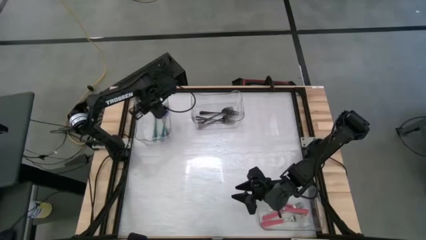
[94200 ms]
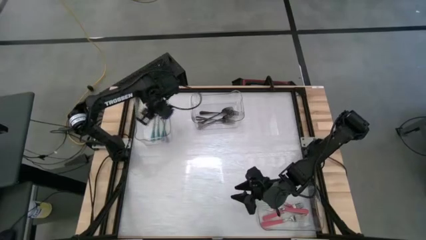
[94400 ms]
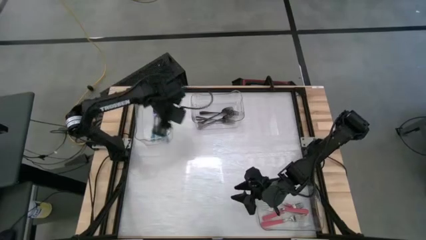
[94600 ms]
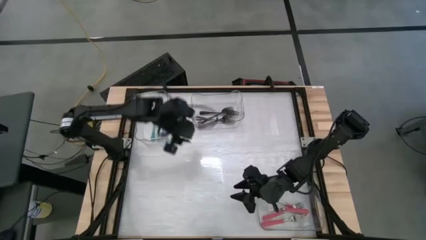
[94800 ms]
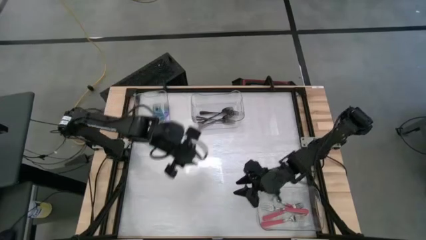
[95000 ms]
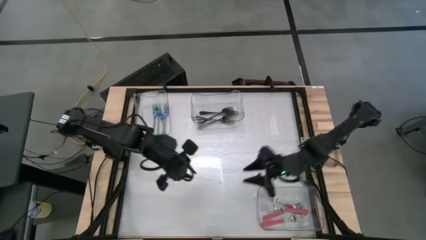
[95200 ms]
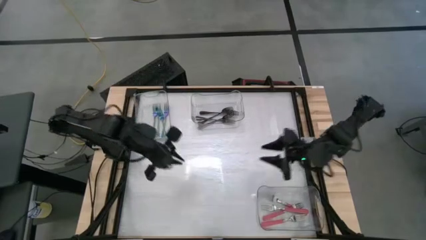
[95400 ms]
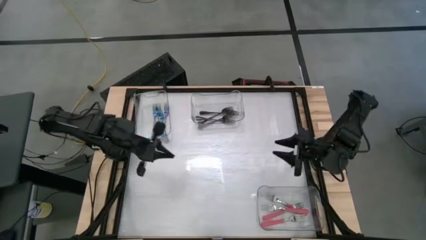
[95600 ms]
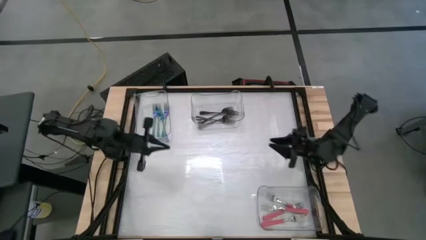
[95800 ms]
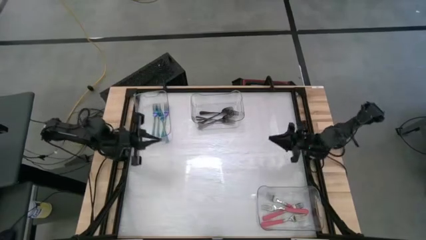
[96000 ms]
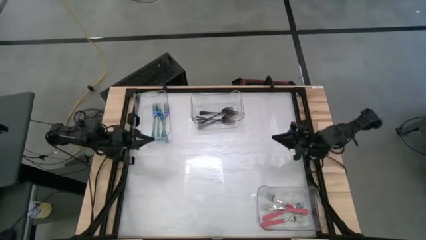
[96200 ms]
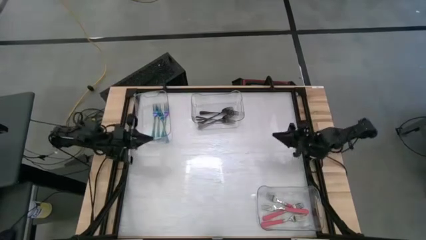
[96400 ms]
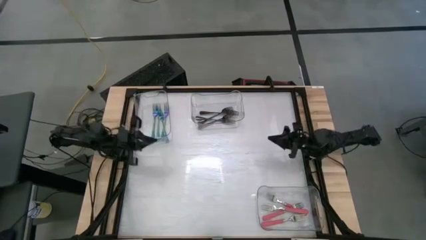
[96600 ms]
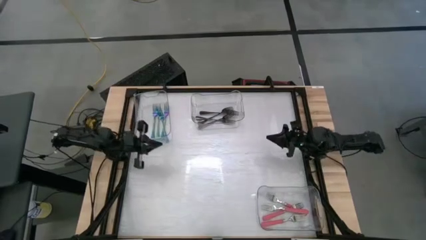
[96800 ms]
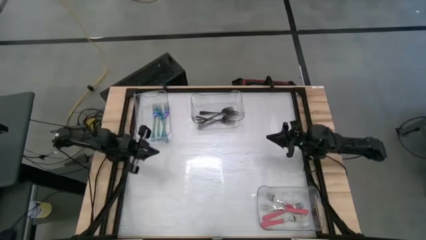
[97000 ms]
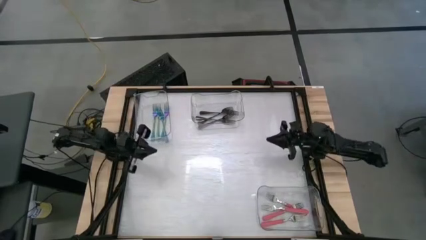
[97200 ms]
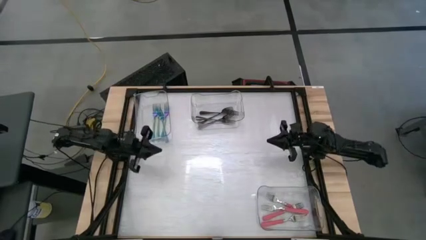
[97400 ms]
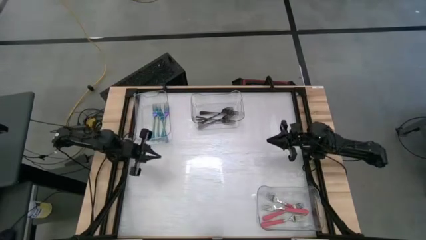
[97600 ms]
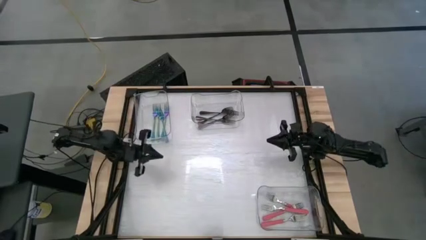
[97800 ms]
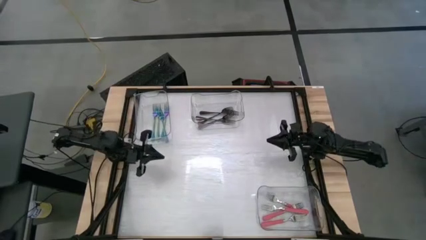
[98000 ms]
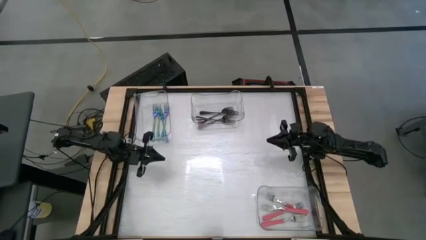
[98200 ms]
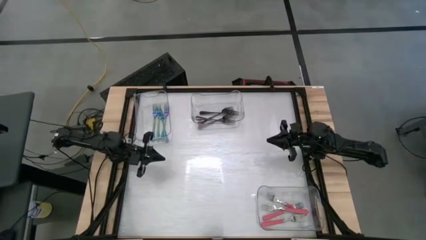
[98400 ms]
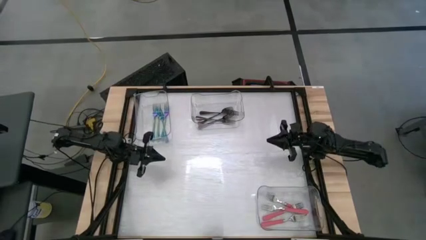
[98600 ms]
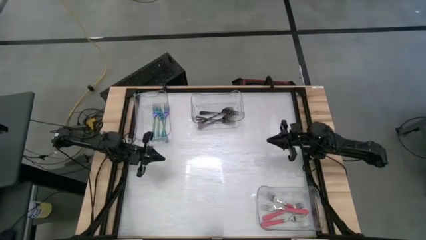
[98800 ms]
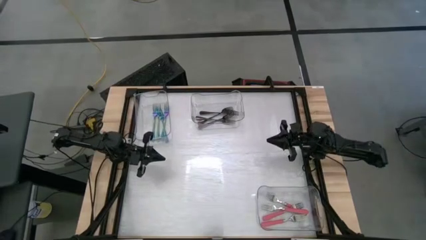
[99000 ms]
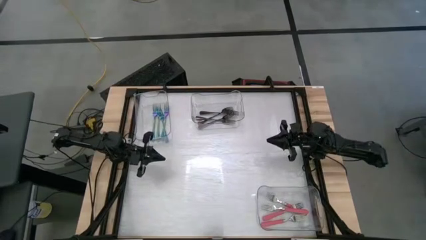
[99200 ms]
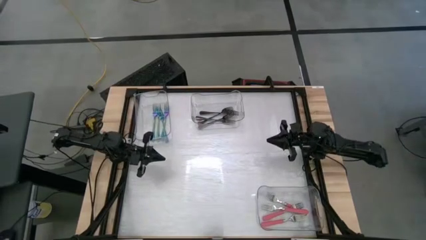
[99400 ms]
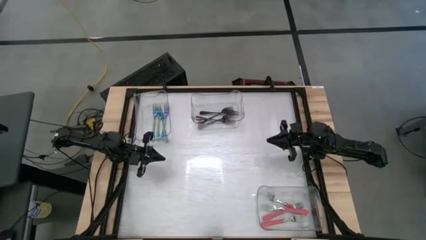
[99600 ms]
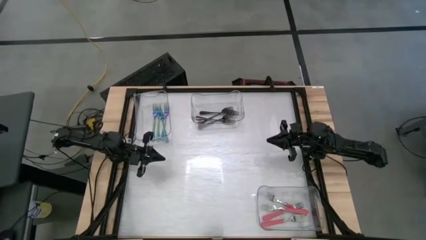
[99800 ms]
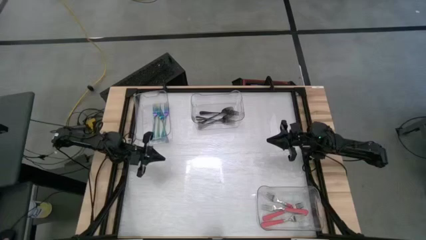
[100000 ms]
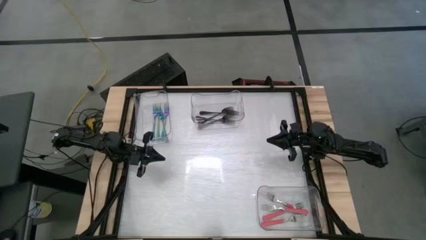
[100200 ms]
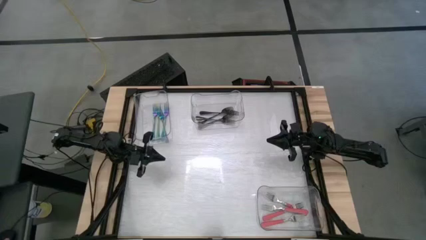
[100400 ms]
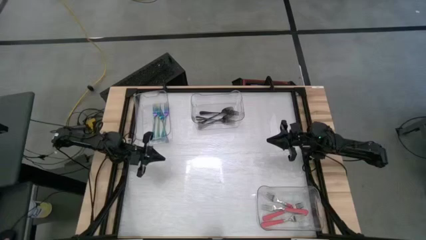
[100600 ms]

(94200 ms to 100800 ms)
Task: Sort silverware by color (type)
Return to Home Position

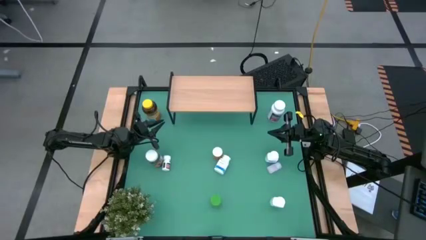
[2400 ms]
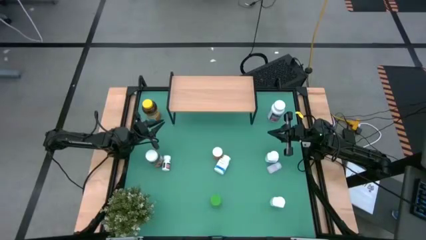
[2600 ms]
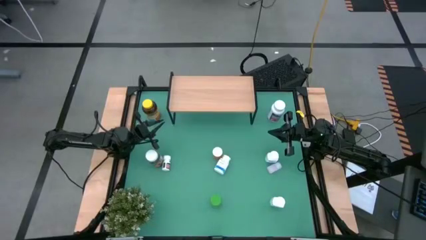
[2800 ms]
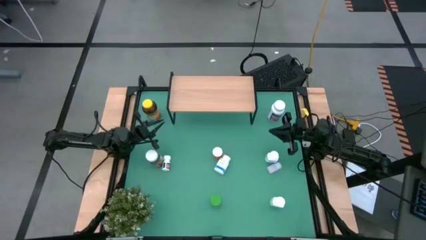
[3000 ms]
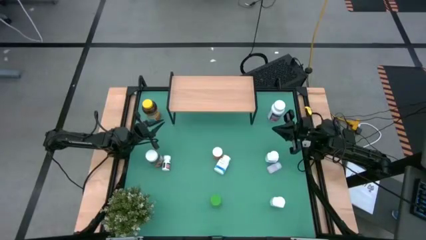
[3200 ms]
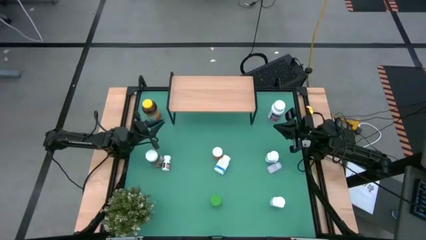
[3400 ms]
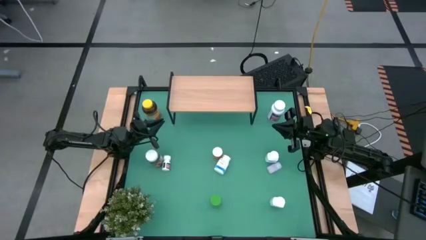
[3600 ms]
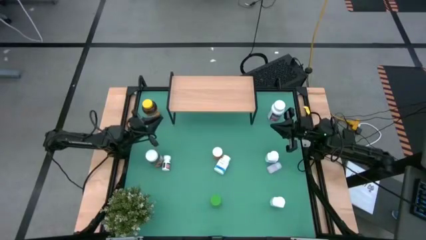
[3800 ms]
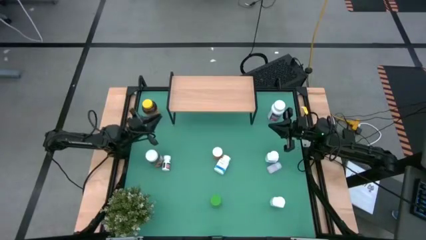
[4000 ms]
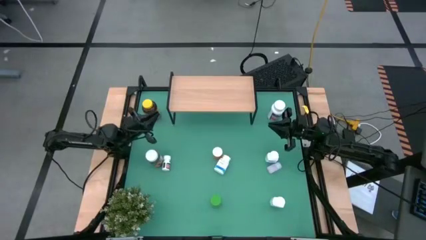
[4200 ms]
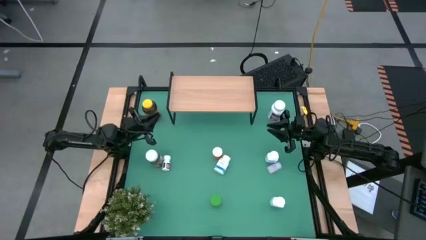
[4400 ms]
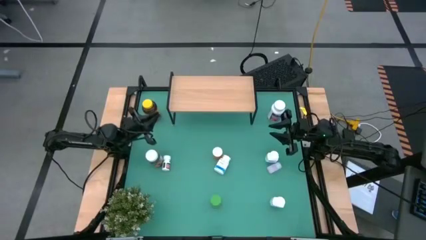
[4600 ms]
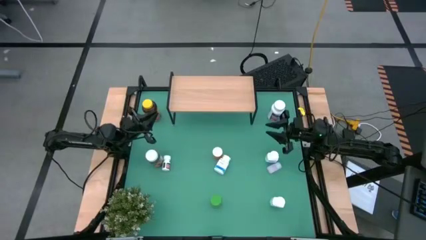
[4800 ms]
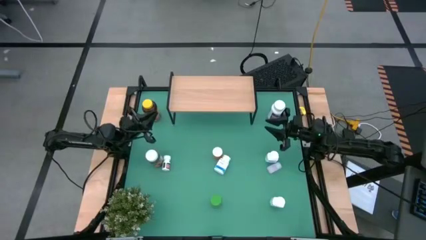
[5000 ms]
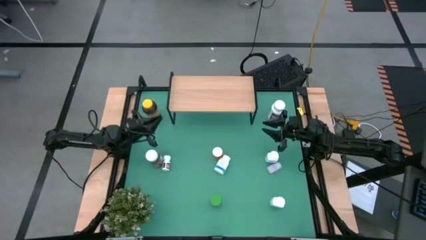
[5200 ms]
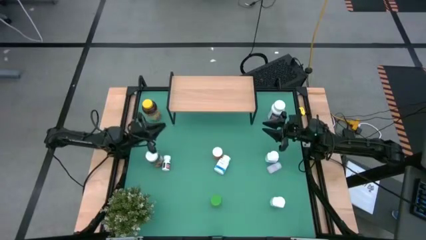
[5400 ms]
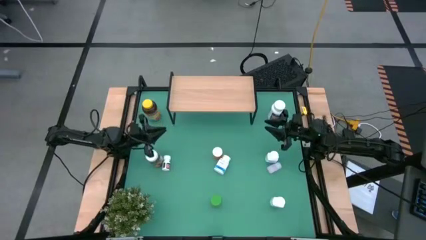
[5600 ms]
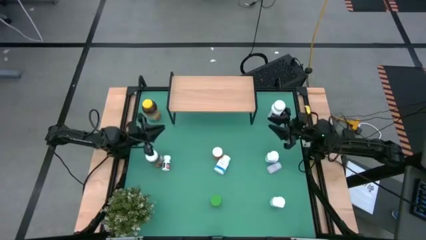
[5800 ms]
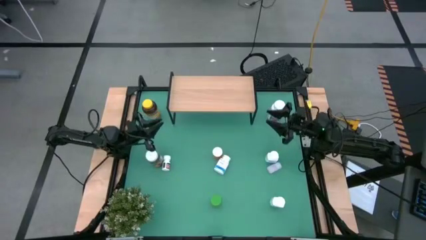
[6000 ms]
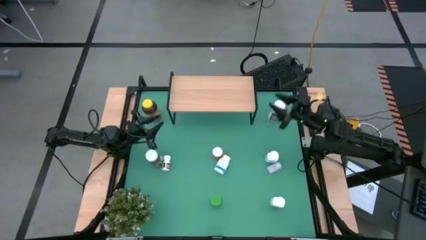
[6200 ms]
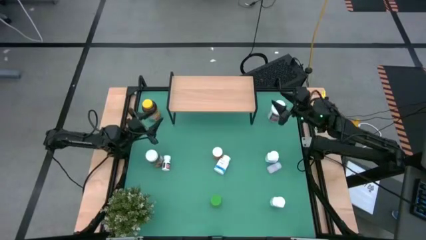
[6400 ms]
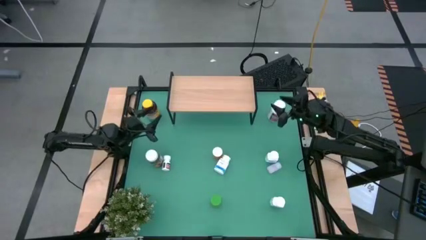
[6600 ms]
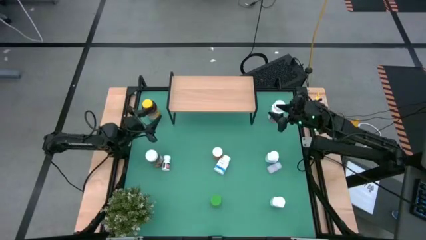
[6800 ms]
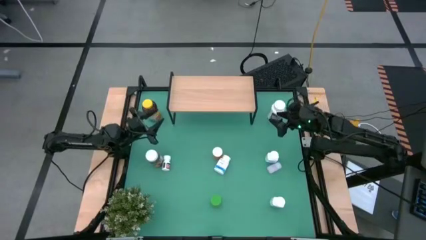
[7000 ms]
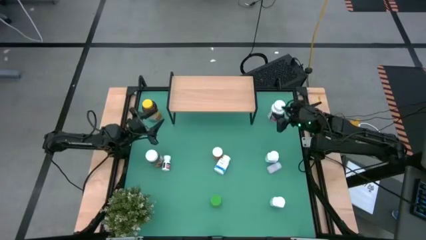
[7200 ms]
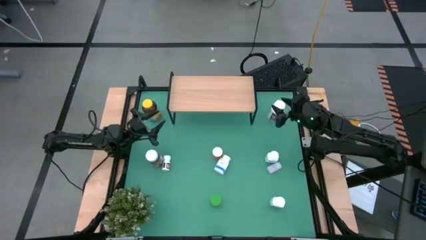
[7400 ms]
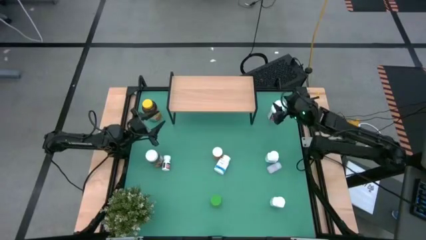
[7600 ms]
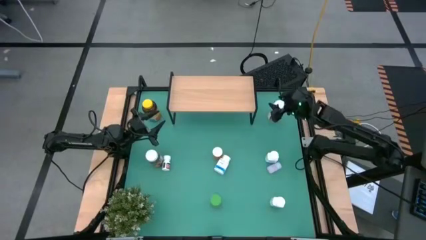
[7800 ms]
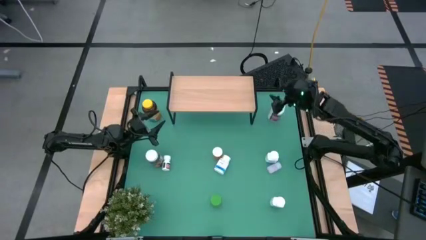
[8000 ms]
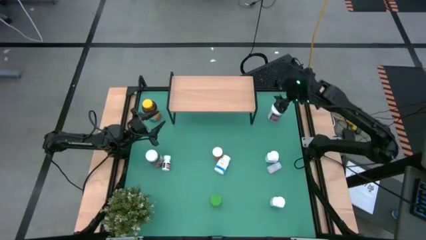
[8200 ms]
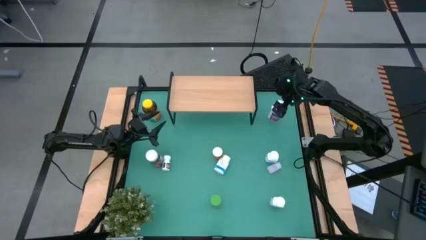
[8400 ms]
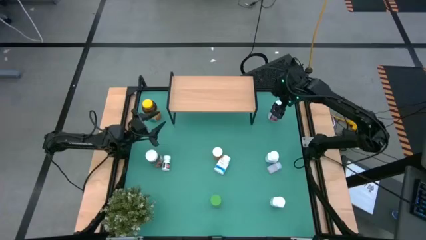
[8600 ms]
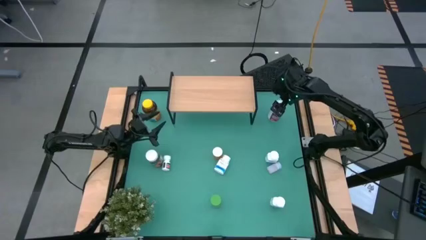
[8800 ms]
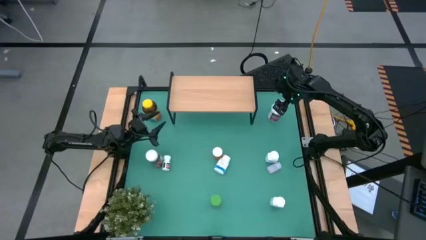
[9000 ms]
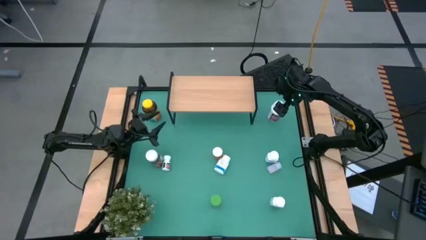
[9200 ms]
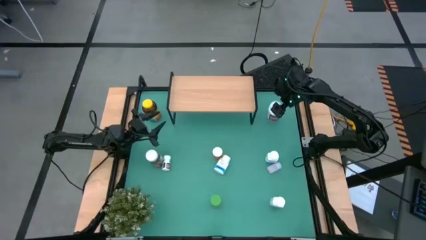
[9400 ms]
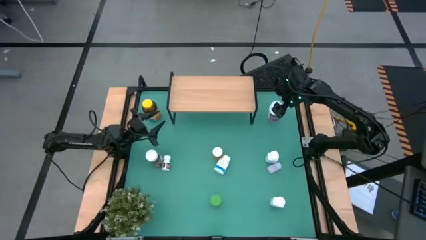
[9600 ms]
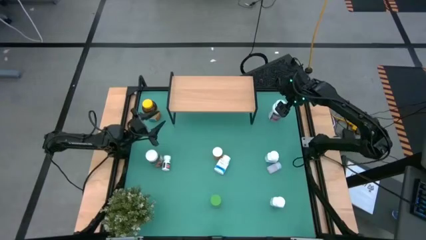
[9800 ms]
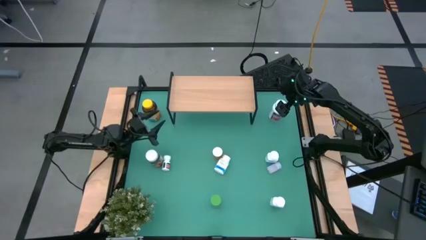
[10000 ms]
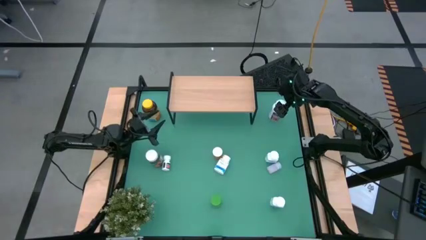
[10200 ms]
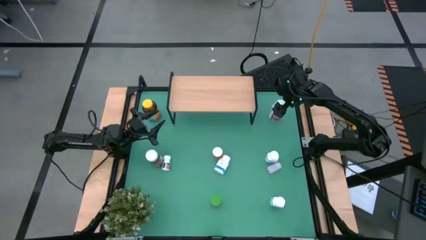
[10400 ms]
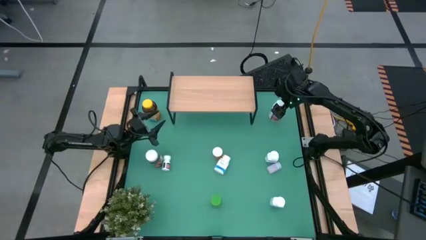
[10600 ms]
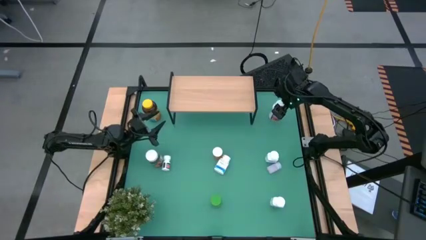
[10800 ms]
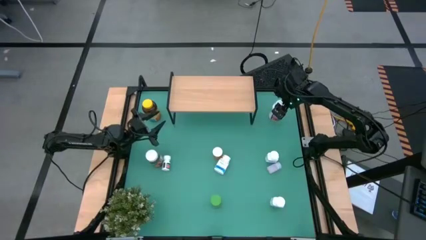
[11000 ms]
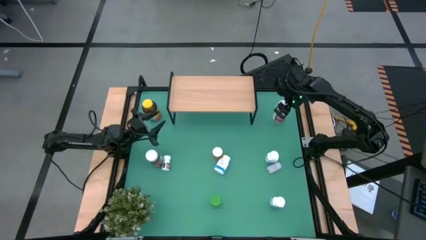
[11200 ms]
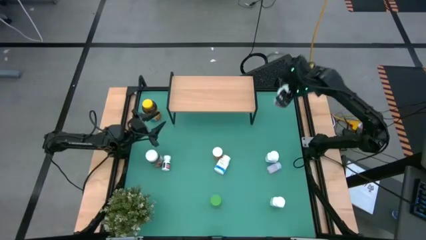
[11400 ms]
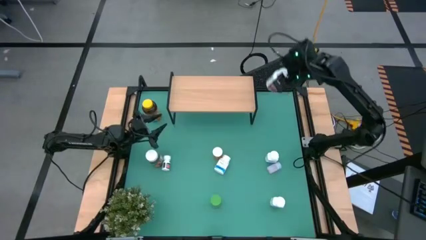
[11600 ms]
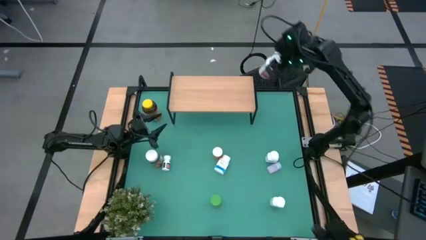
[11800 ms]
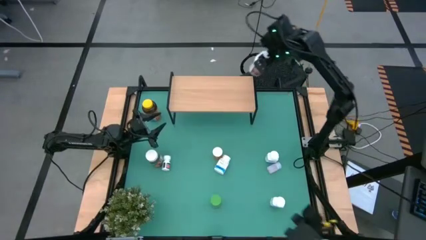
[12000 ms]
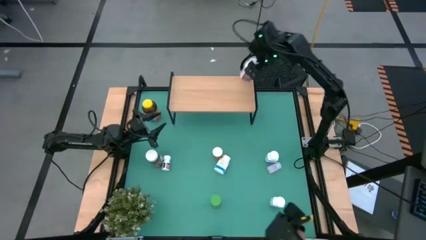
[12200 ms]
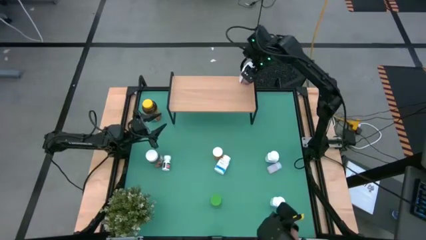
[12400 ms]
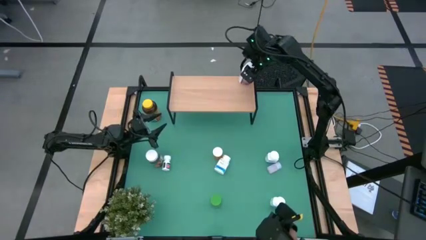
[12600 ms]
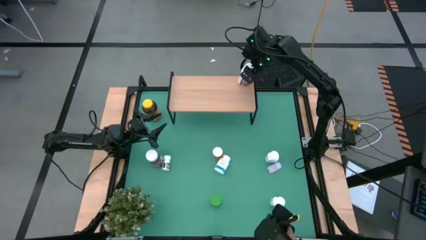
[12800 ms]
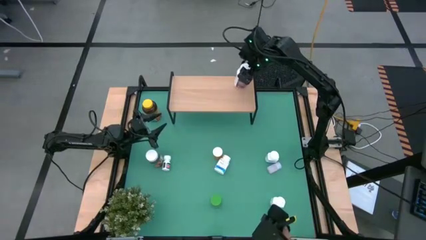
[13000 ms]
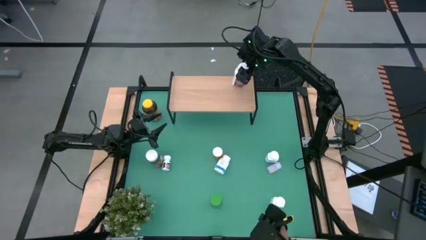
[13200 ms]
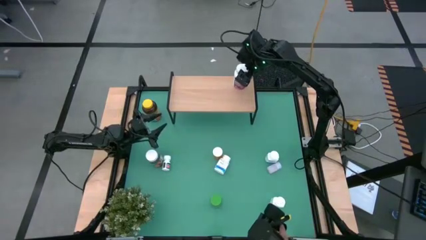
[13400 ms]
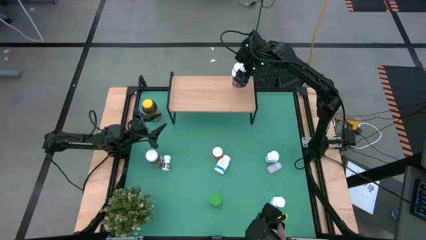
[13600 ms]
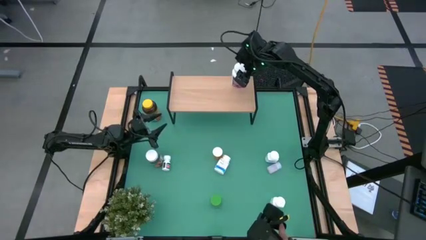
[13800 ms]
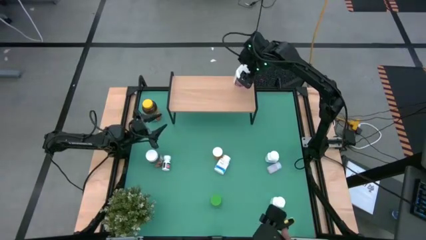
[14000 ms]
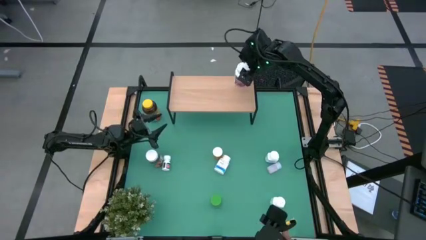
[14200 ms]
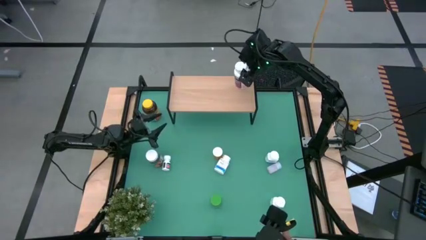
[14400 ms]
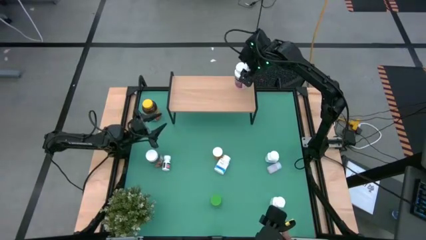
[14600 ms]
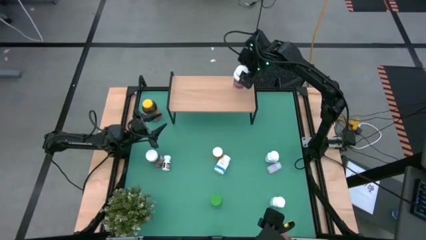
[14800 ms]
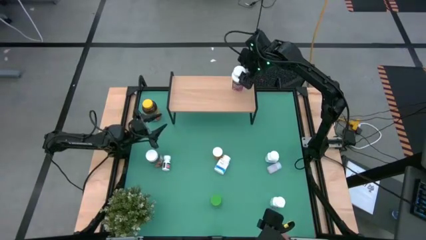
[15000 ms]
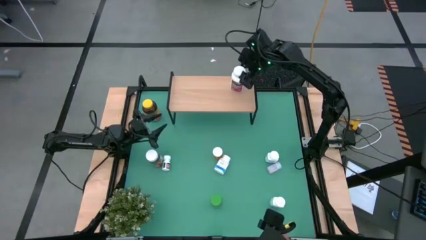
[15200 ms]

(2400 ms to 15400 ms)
Task: Pick and place medicine bottles onto shelf by color
Put the white purple medicine bottle on the shelf
